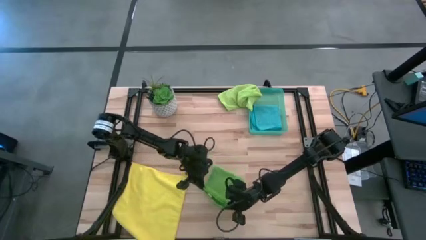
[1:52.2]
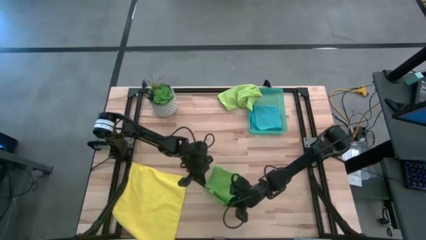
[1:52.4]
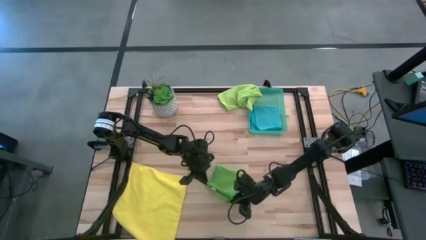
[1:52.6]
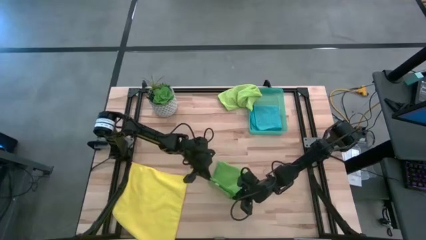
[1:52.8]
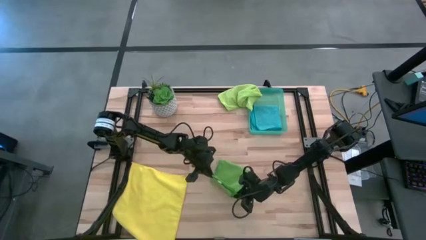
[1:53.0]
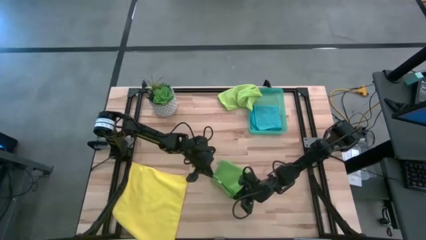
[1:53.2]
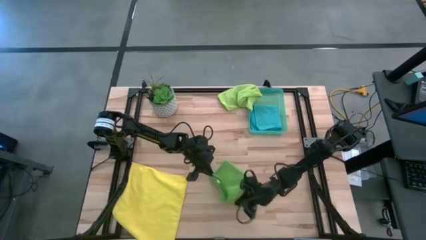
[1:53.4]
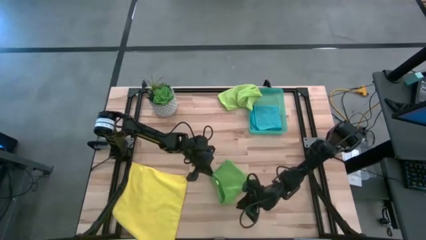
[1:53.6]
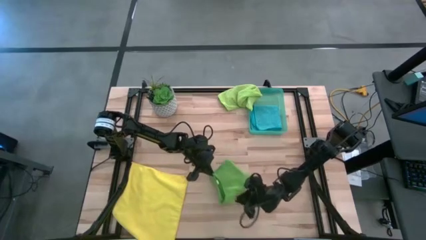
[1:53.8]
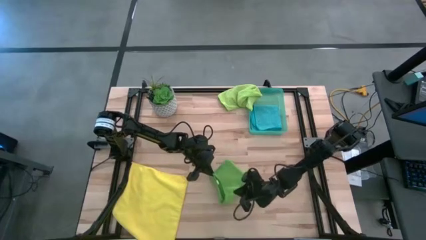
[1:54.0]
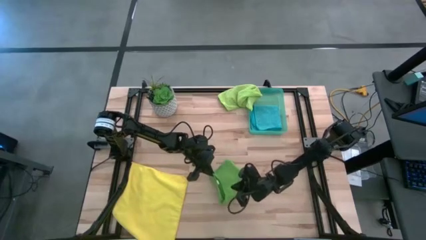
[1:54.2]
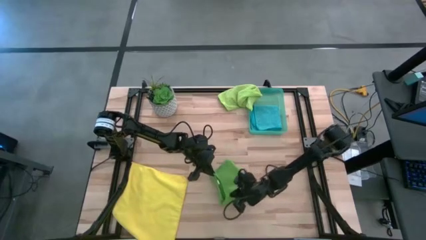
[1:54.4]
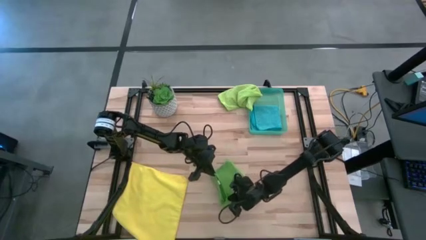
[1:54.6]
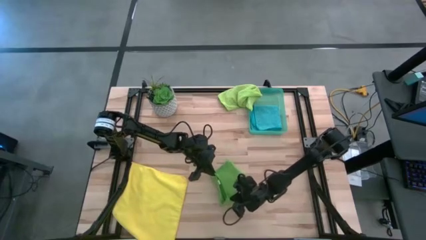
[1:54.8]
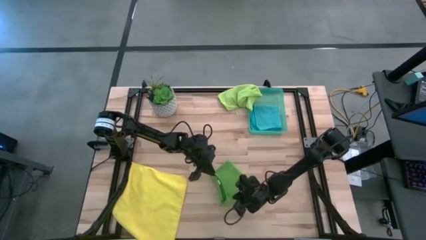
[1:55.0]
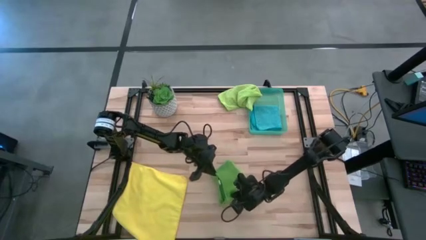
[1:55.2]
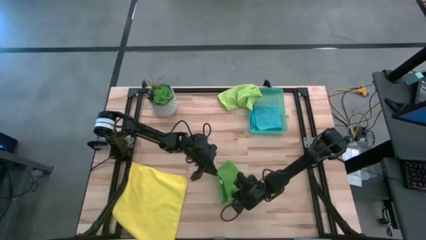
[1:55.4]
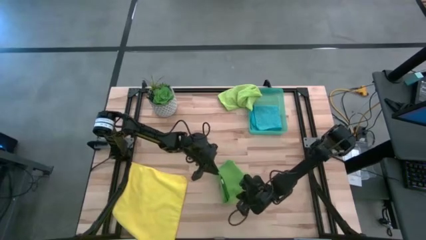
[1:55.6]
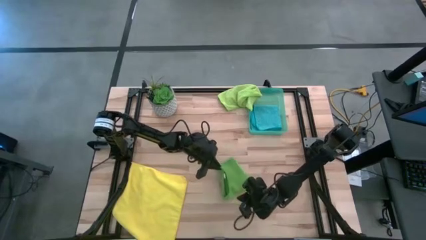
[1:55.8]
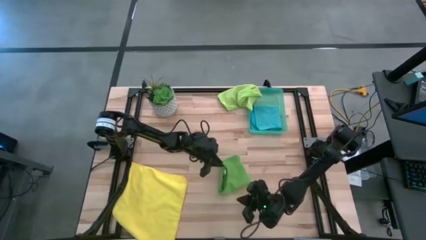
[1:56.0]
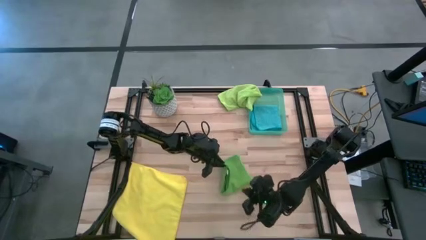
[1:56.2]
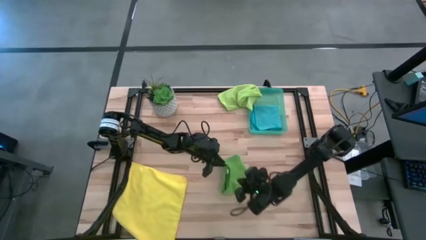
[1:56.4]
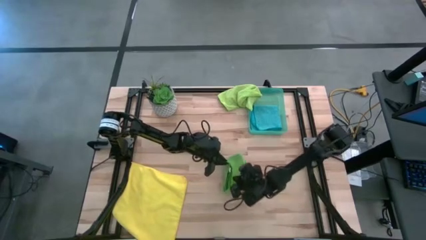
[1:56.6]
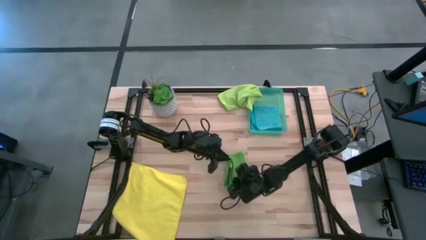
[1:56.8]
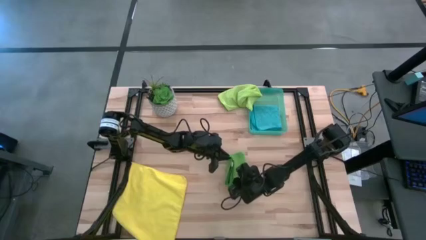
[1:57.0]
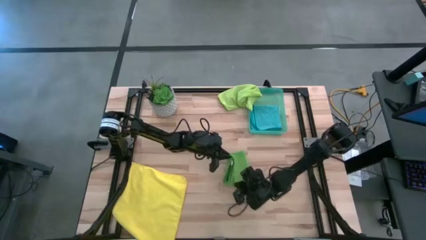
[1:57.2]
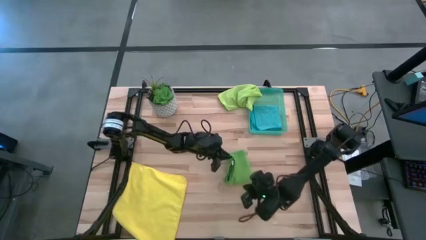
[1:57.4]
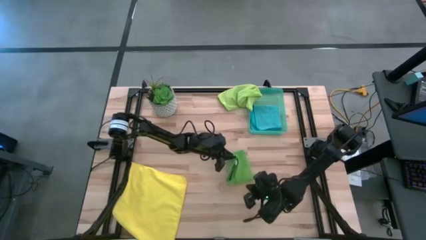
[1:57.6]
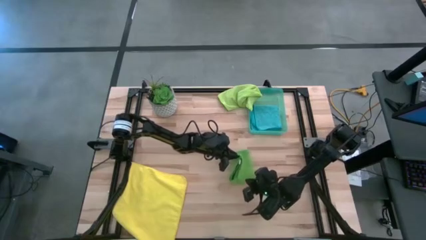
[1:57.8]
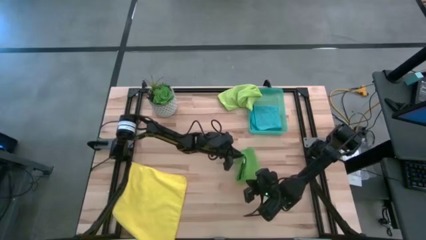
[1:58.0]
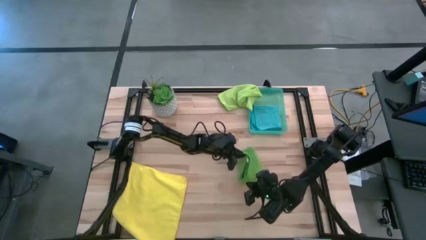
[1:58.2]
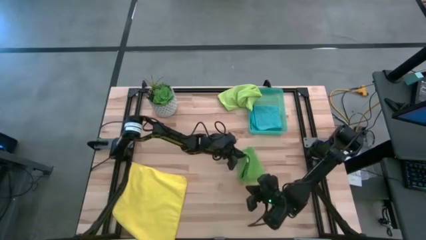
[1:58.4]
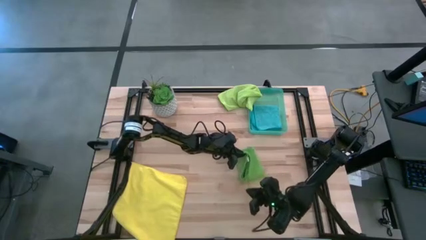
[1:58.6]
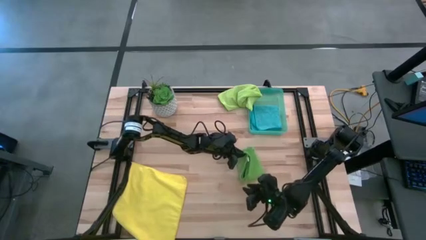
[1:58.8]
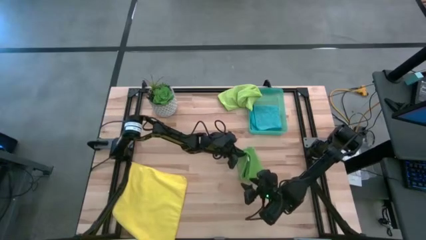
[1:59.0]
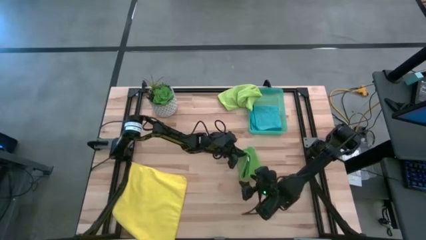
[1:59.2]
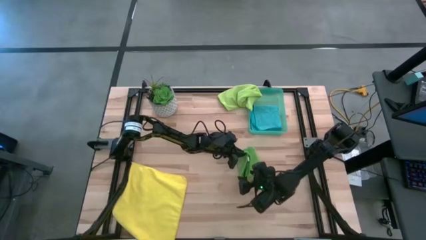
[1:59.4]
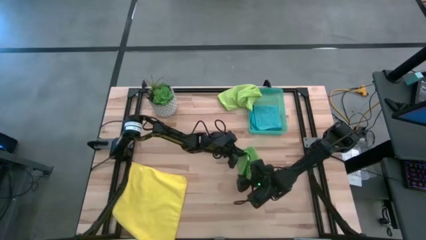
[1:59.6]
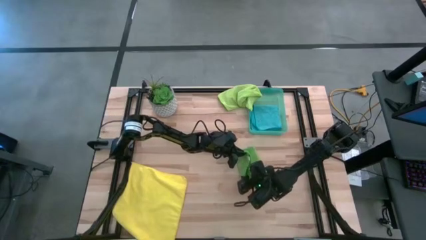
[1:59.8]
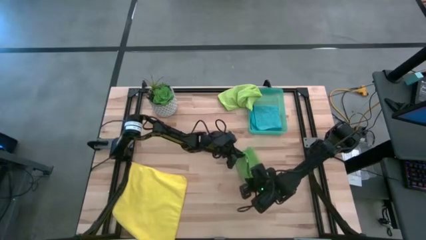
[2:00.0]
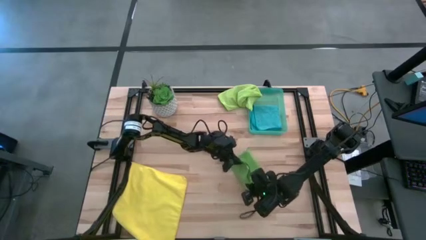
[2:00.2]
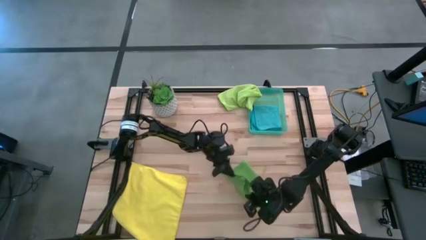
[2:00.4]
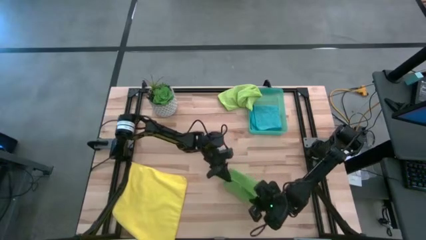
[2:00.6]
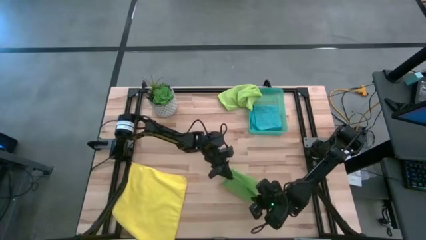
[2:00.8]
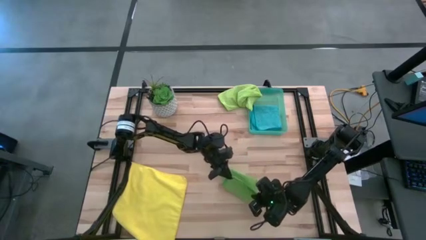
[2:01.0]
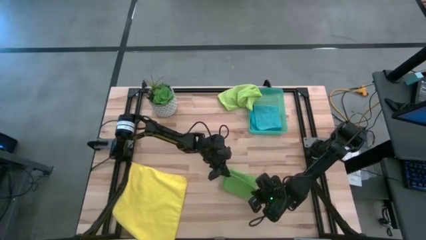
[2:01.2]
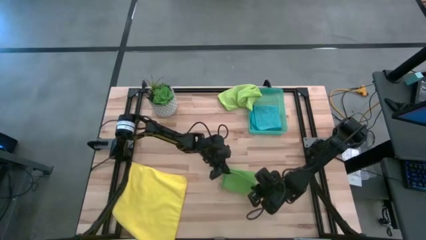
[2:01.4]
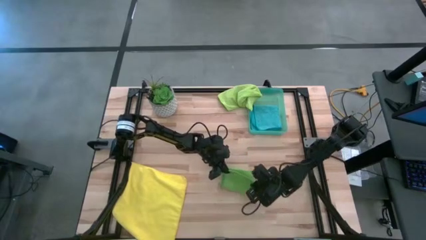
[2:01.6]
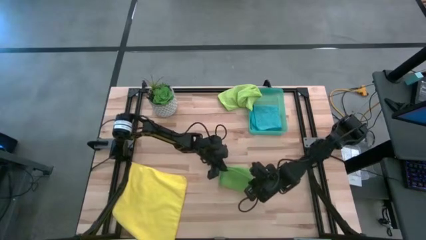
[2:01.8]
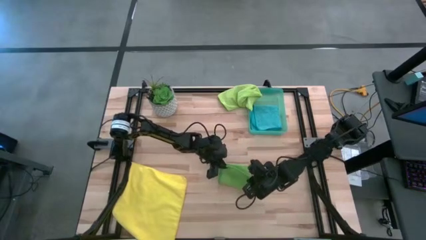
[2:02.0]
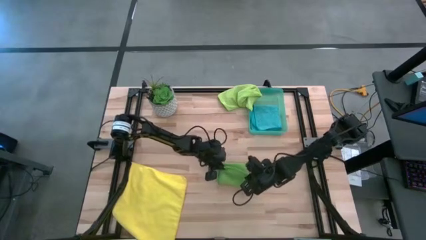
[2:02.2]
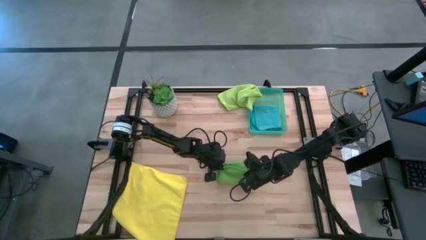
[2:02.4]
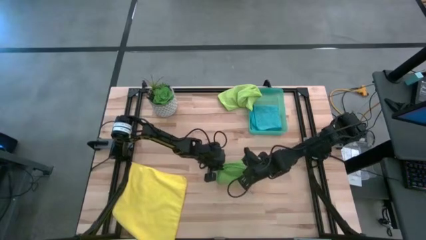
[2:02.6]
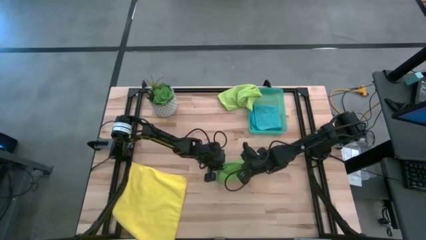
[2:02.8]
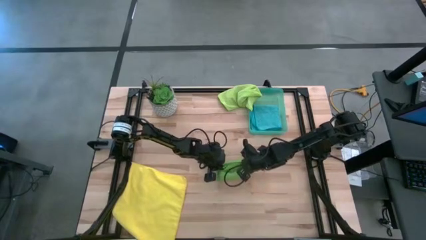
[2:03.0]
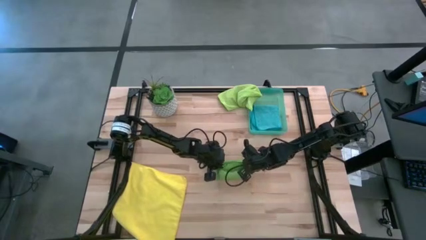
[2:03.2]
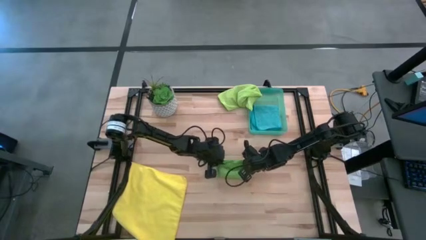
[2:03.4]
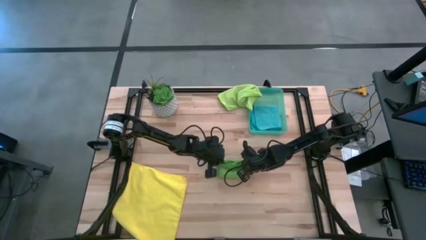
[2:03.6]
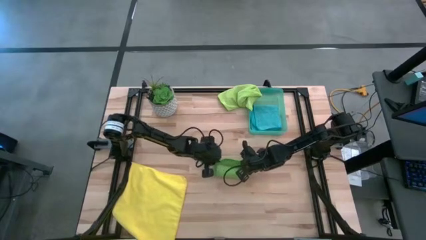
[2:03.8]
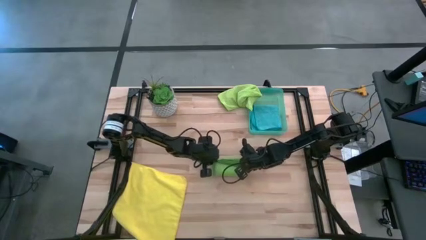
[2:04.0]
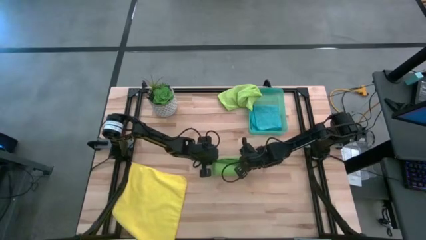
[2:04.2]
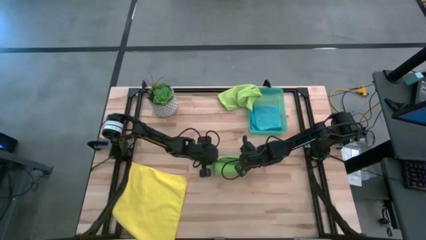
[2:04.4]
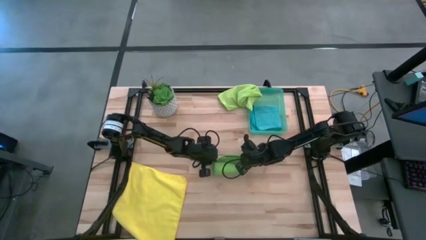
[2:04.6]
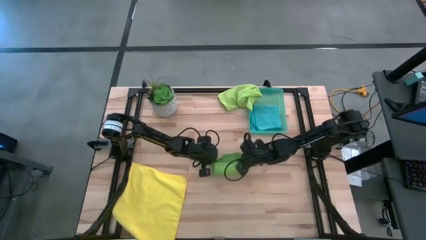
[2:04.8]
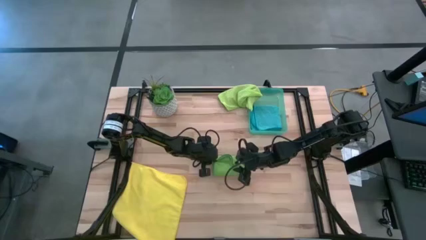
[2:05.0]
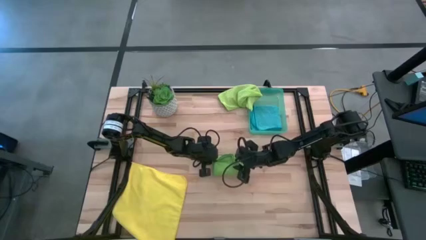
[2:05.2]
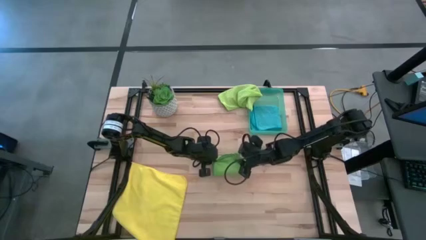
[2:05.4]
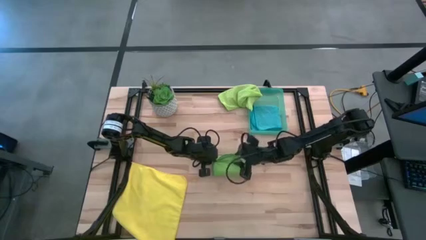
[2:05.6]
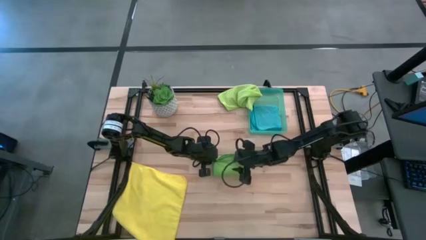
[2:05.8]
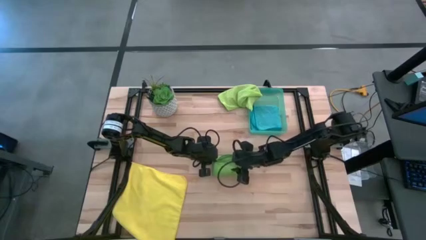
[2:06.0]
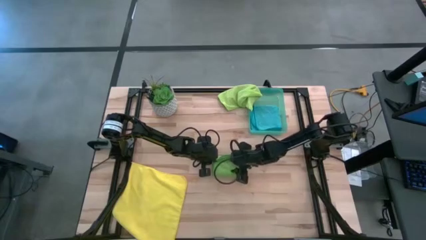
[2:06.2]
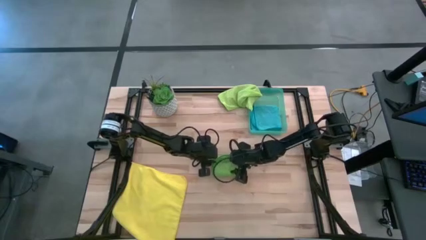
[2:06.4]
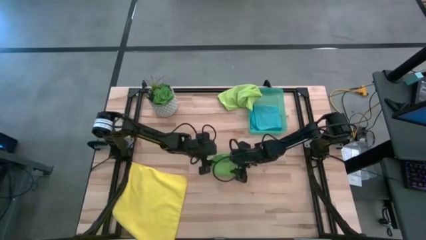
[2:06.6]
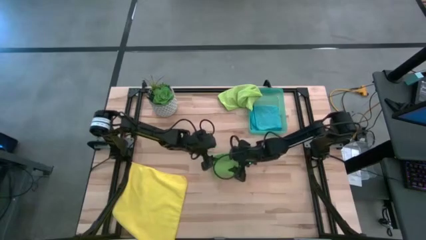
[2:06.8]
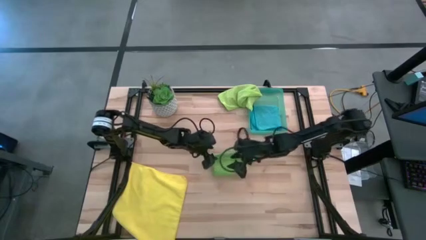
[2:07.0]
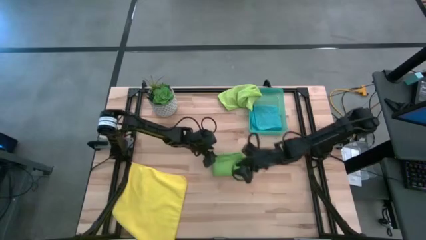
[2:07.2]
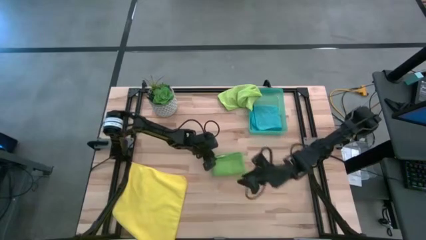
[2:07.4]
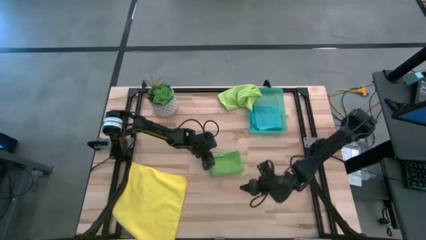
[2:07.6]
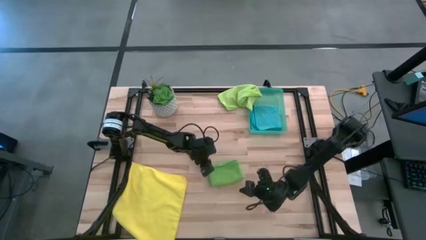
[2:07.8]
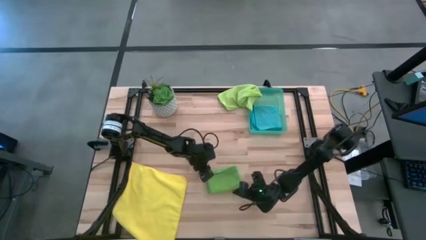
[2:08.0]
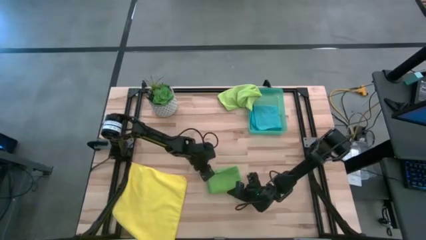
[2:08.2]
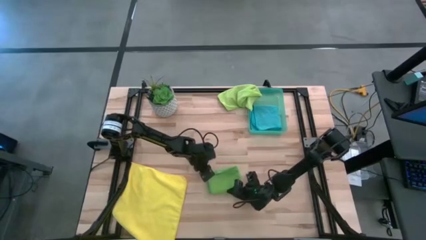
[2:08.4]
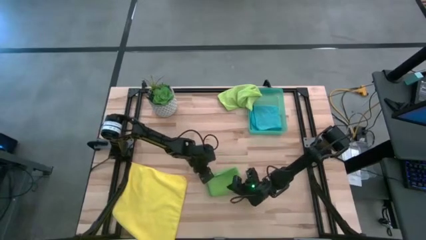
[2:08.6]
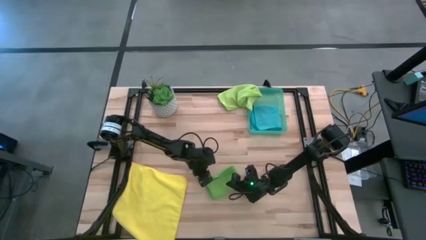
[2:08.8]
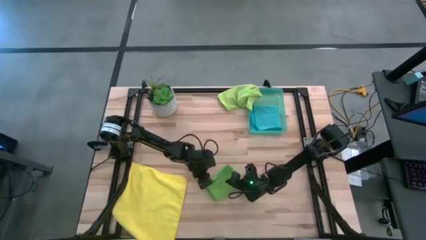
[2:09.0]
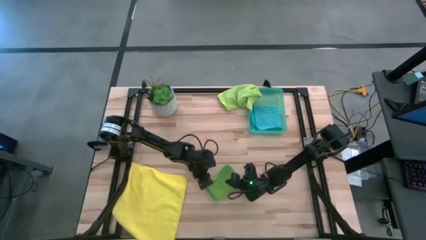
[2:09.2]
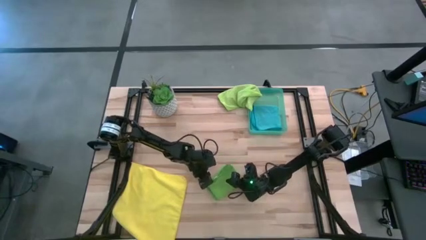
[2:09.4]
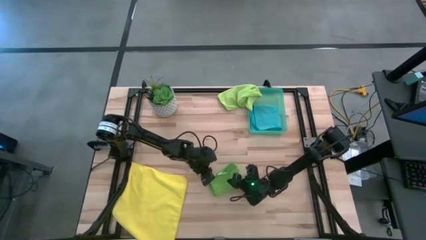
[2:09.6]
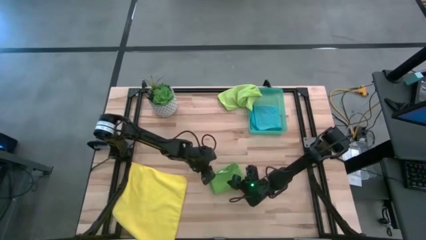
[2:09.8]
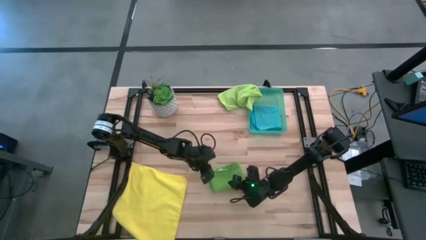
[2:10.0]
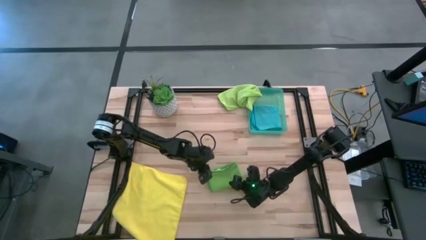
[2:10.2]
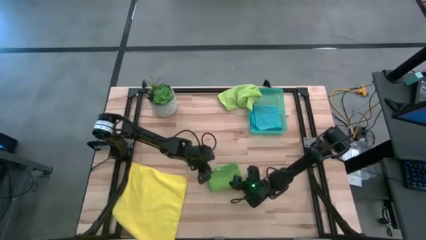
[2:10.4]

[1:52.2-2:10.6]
Task: Fold microfiber towels
Fold the green towel
